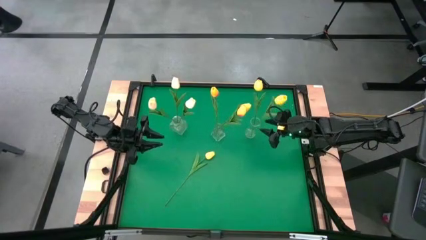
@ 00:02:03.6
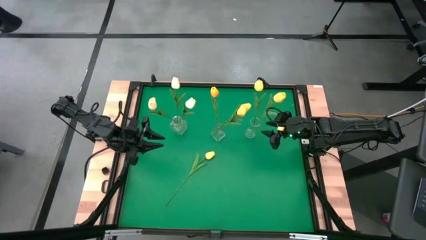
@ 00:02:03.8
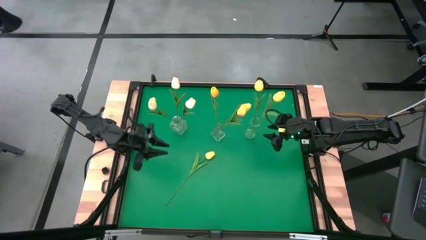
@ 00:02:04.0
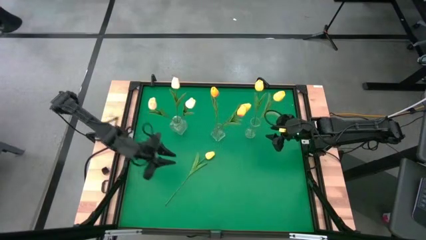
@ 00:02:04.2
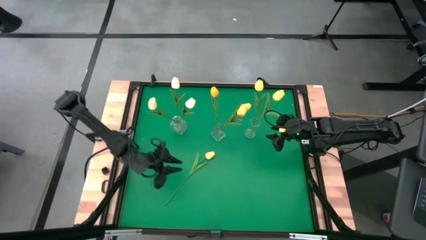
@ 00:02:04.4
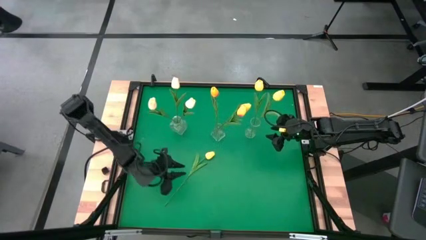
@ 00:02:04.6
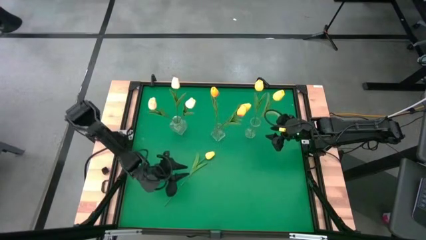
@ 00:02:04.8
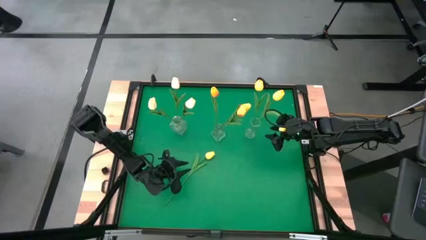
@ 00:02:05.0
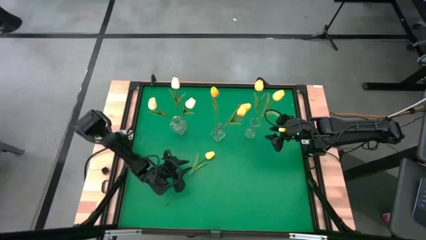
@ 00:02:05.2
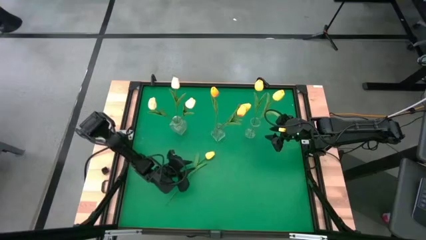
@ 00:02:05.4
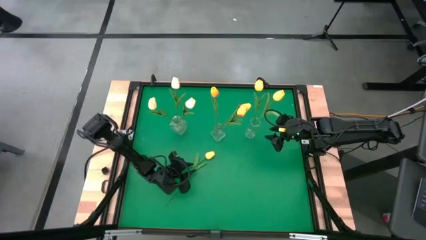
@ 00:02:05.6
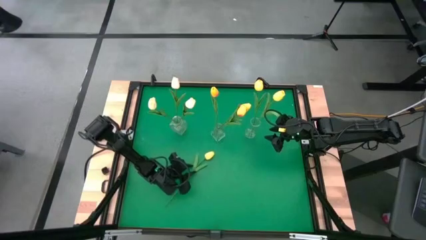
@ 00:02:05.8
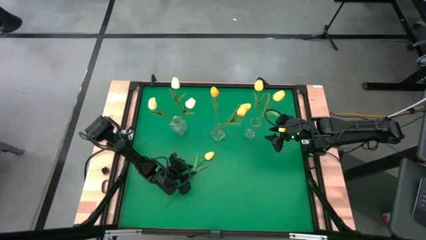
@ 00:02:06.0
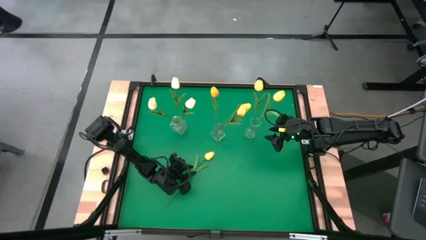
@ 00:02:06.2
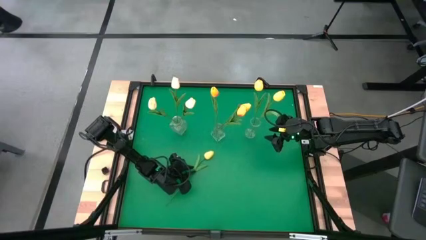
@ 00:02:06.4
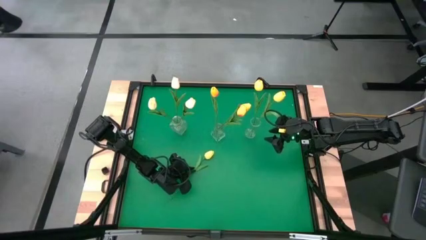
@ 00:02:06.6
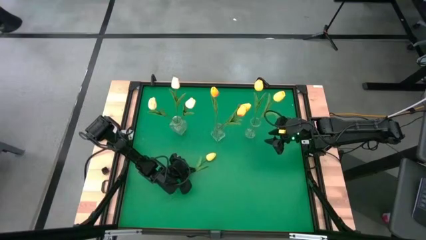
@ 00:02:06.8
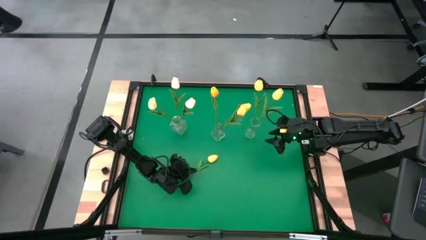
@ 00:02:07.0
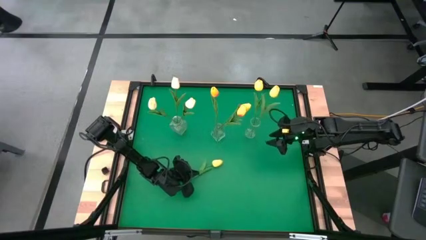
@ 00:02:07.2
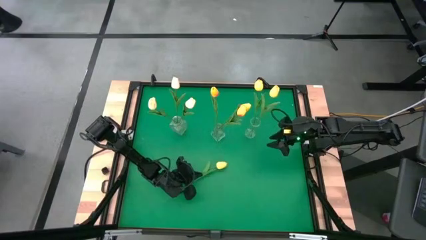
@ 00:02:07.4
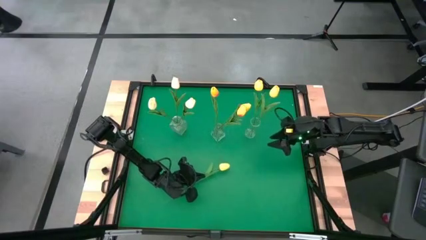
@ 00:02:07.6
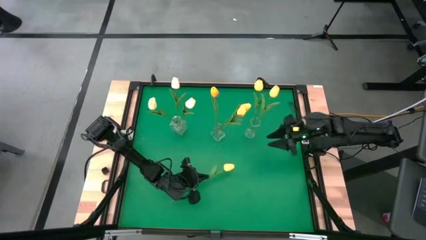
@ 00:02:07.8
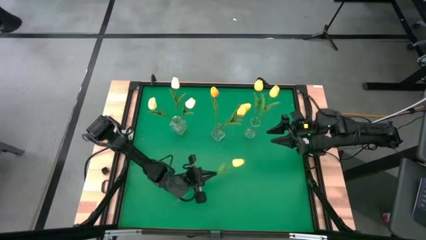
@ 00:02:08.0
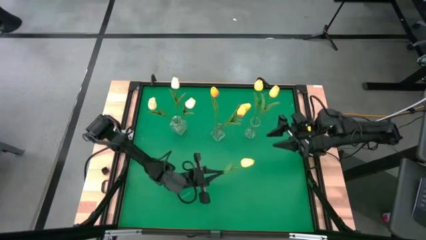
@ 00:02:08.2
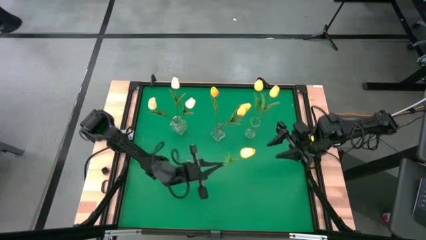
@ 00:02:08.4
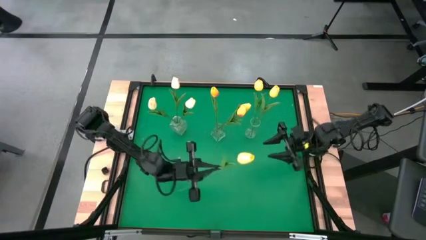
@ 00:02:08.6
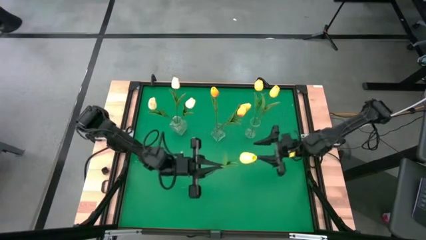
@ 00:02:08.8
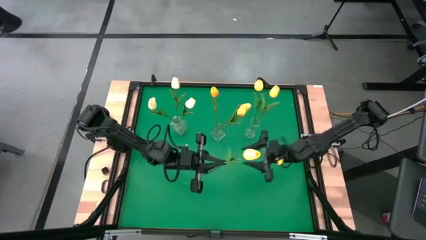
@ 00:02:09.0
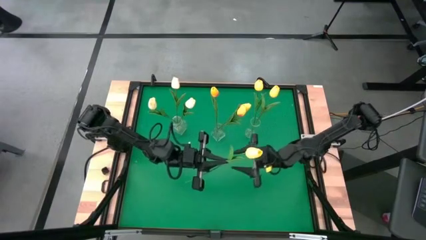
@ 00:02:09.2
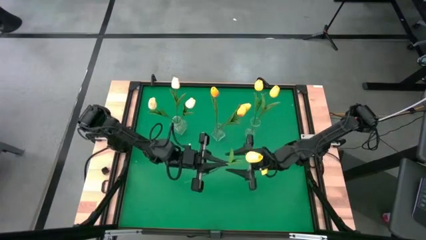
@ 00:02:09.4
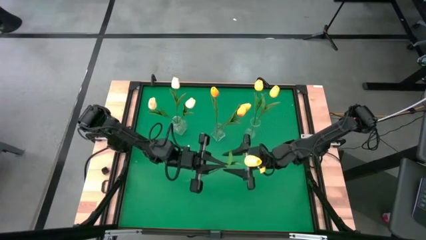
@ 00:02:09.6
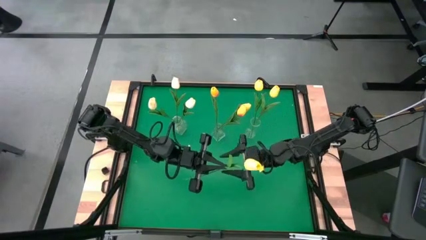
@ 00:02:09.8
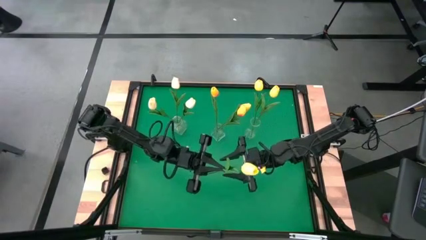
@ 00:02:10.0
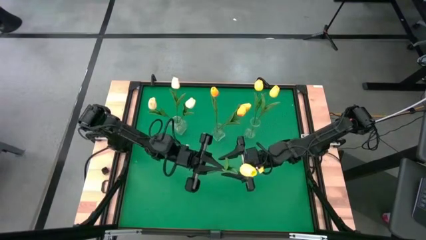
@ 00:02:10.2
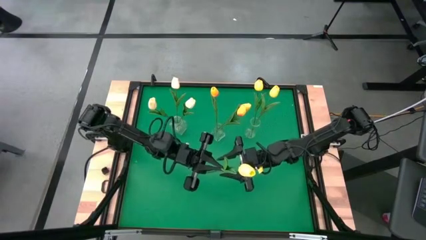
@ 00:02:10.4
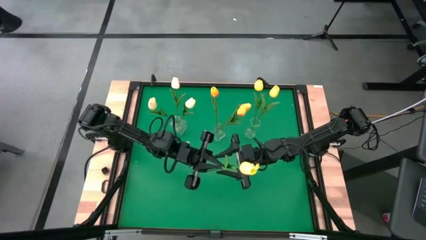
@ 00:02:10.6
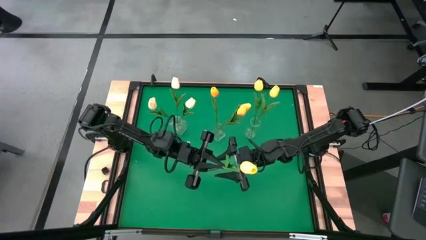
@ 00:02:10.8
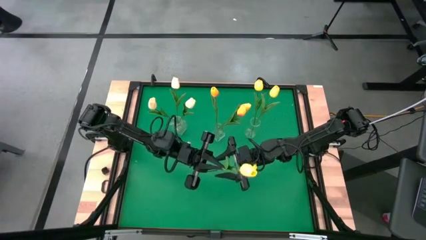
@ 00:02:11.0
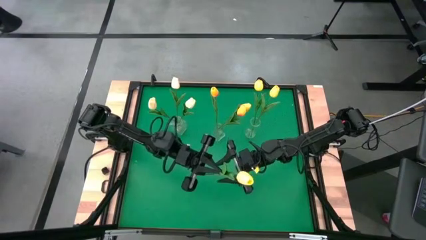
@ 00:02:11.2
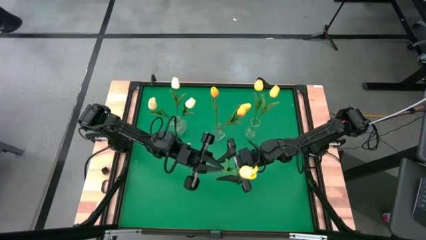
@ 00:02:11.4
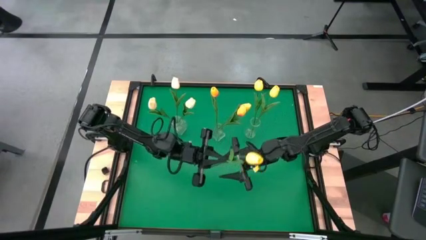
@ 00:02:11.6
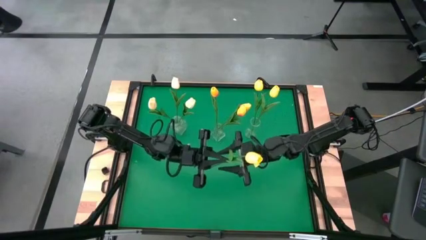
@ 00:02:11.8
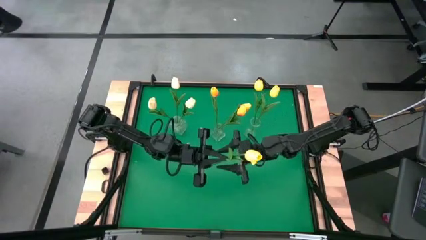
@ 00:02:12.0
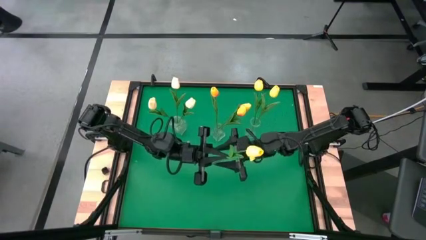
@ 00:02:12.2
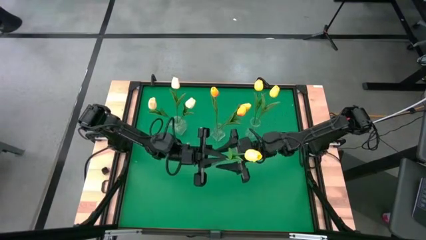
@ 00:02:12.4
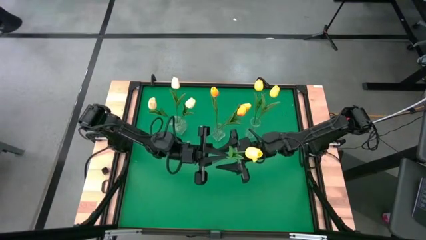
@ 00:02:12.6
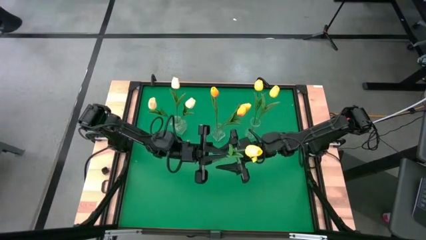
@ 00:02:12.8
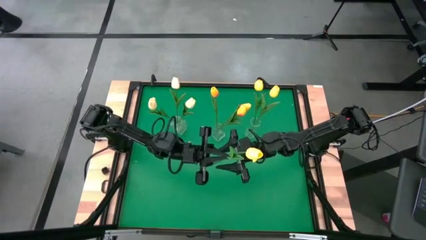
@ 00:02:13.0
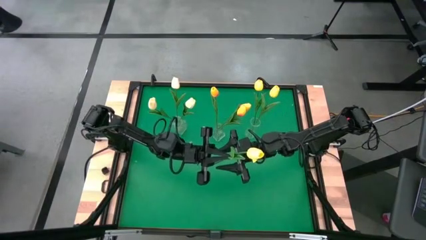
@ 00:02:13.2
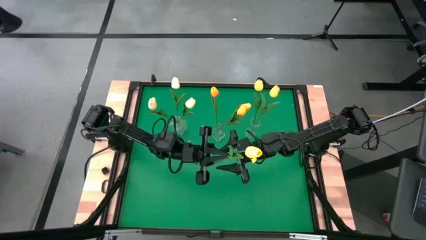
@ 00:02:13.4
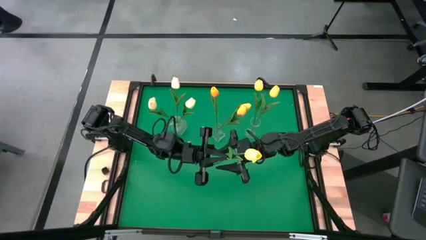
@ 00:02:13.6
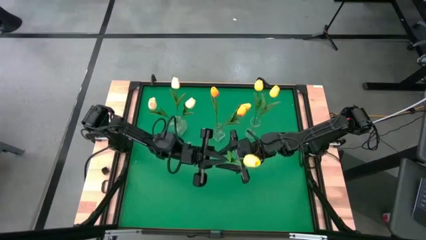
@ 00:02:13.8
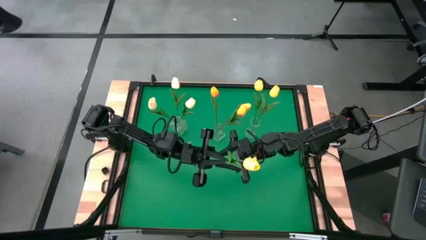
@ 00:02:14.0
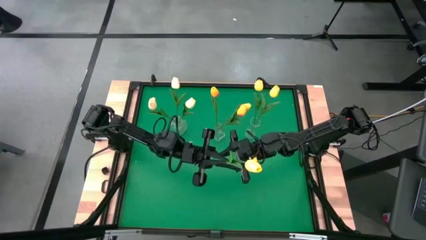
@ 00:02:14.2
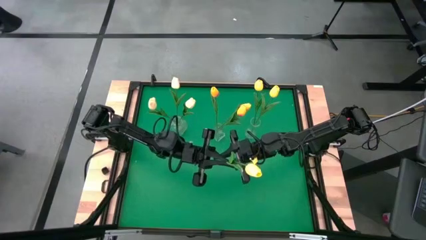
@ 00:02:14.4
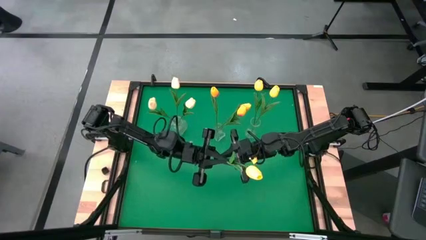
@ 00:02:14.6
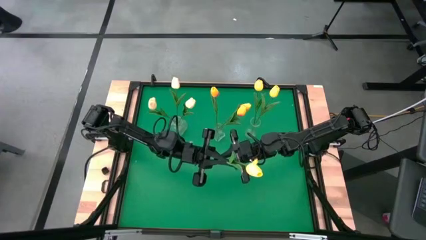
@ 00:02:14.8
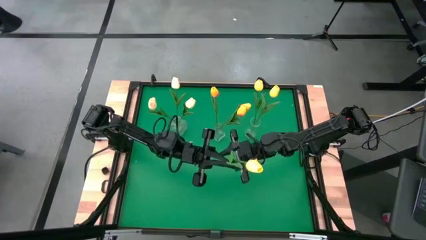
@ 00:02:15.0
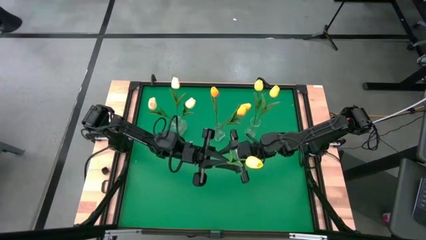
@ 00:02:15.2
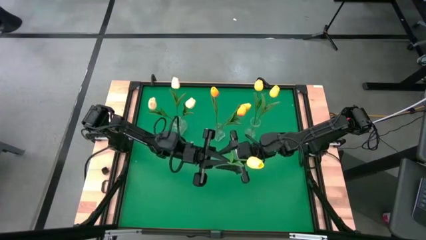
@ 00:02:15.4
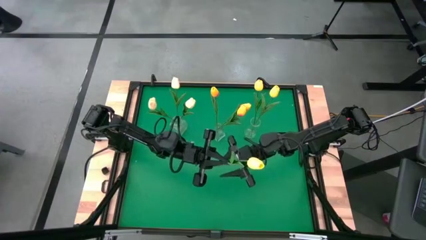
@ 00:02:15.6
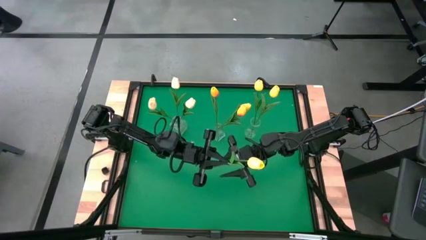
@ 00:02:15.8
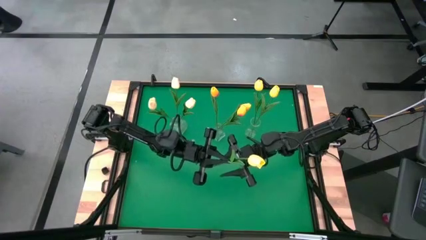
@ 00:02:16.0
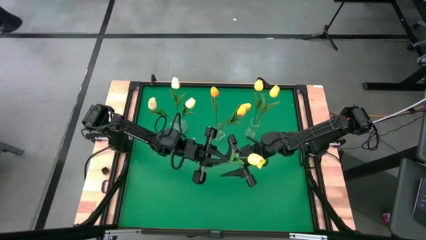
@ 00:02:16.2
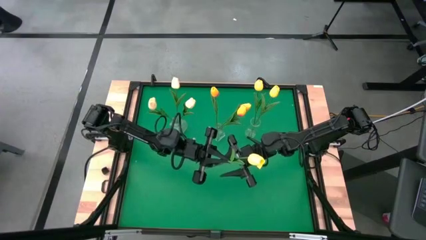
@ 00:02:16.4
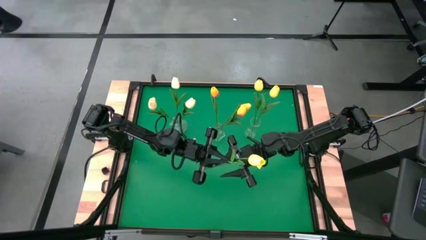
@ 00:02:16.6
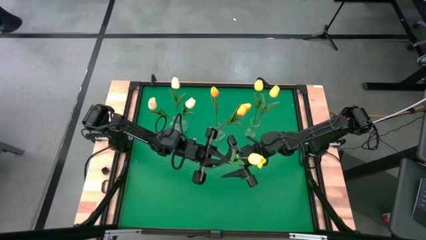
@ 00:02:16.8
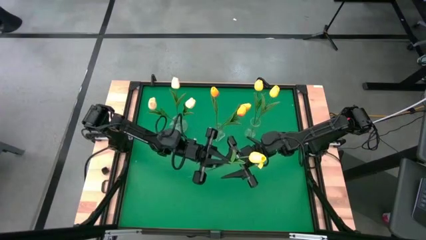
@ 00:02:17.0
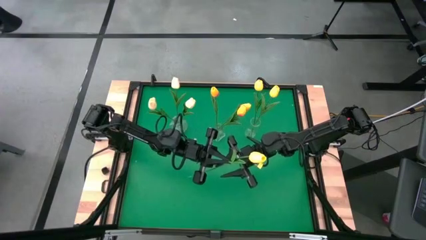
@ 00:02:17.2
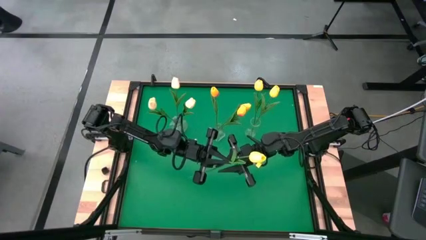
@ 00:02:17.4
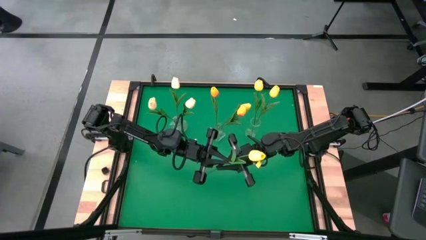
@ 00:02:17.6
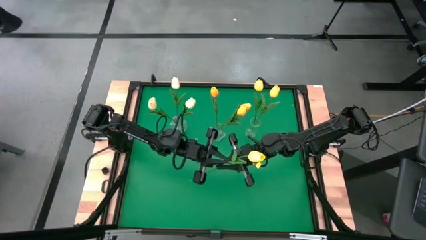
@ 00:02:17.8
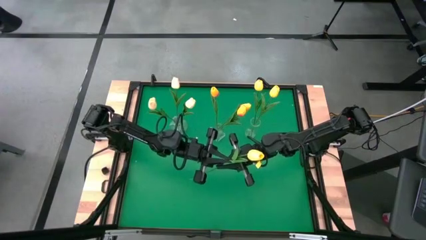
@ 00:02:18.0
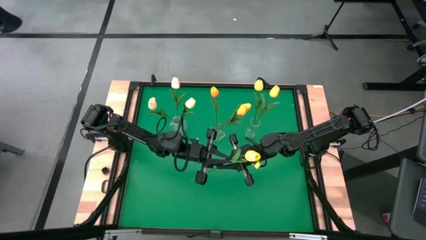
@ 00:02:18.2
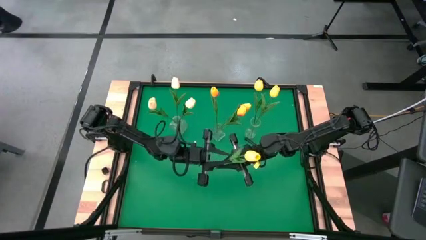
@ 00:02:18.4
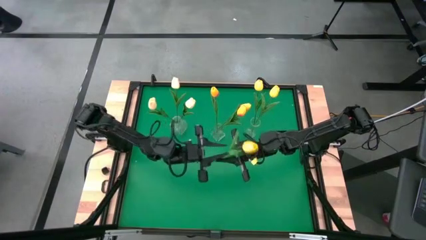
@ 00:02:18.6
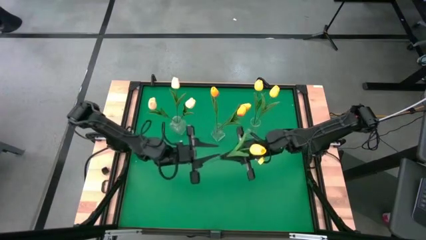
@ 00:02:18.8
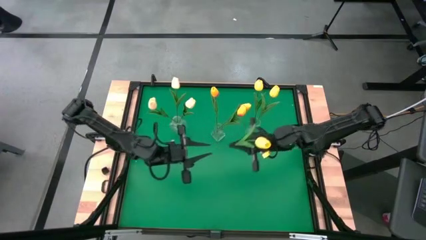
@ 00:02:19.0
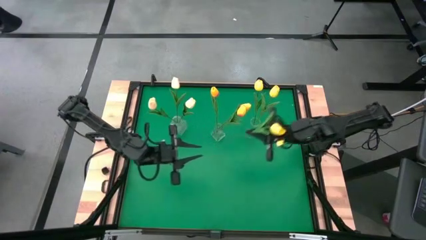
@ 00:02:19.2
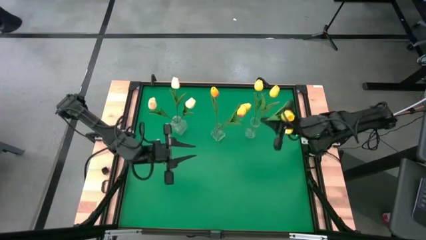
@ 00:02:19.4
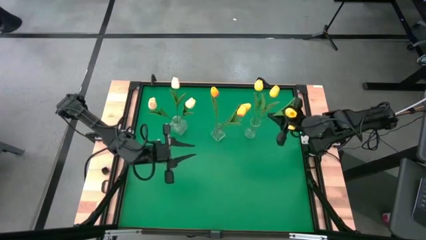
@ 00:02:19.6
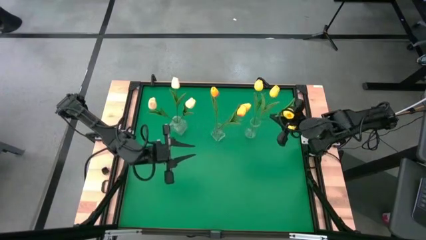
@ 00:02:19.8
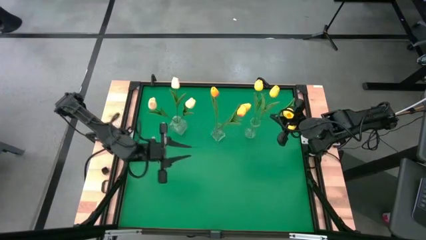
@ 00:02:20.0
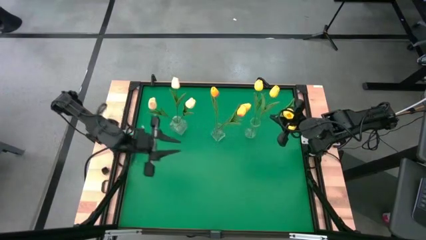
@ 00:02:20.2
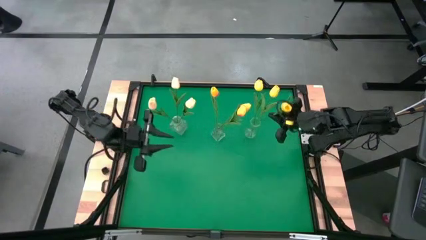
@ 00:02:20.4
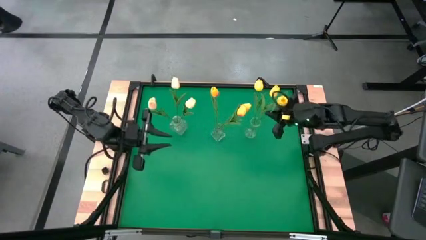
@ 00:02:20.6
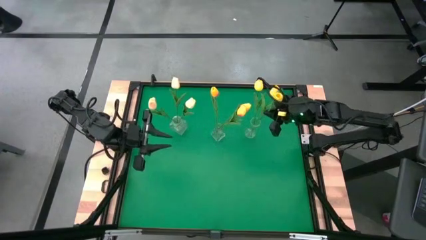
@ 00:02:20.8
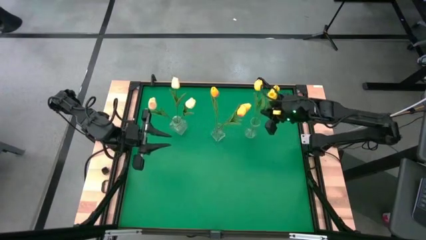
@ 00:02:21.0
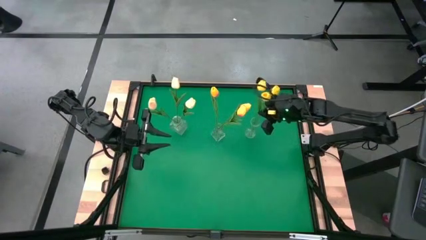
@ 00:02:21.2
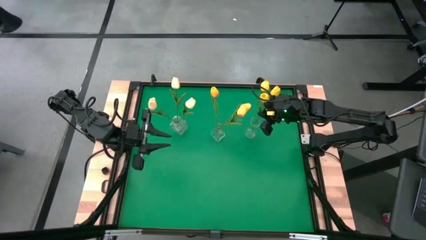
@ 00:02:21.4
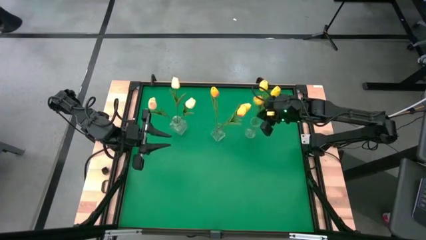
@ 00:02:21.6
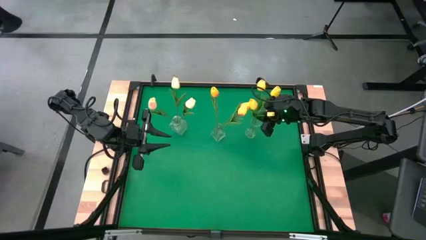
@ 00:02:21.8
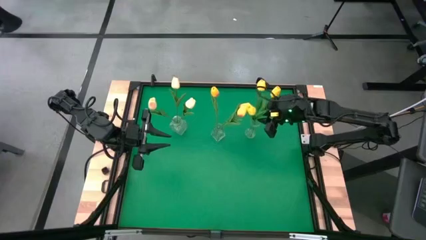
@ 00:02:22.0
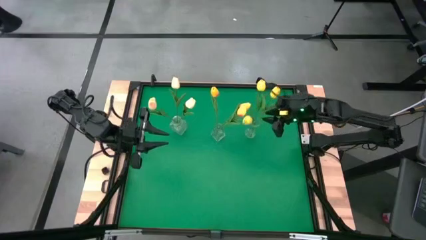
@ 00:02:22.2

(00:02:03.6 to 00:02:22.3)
Task: Sort flowers into vase by color
Put the yellow flower into the right transparent vase
